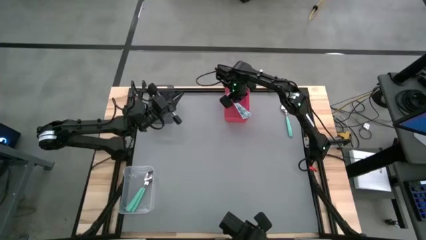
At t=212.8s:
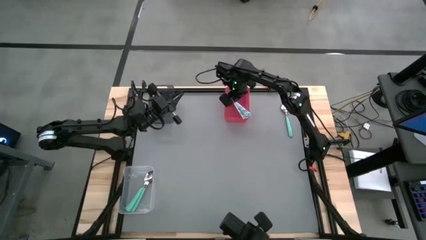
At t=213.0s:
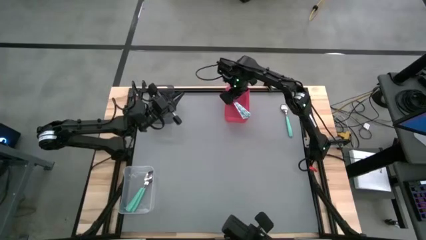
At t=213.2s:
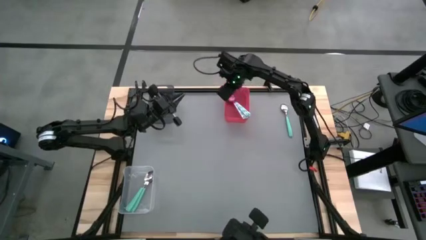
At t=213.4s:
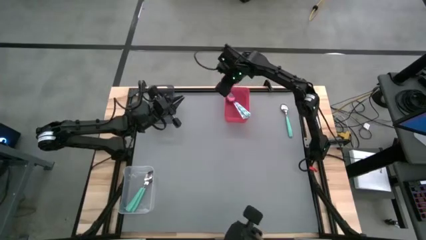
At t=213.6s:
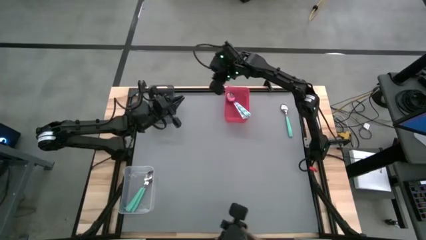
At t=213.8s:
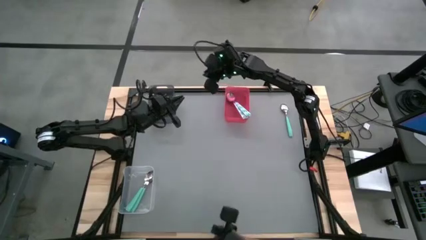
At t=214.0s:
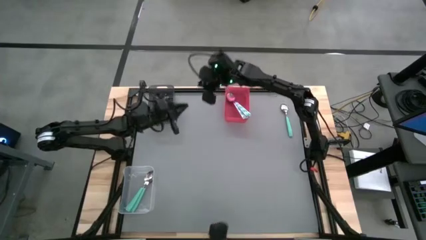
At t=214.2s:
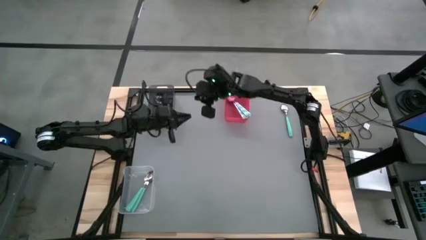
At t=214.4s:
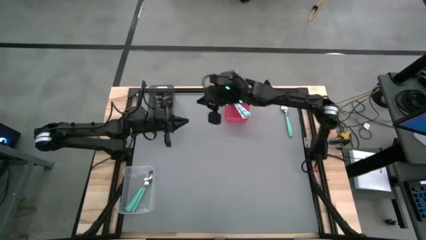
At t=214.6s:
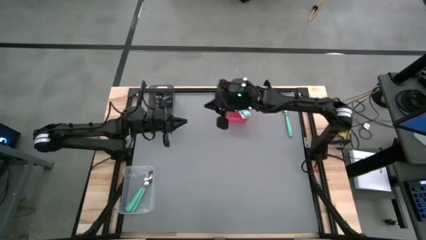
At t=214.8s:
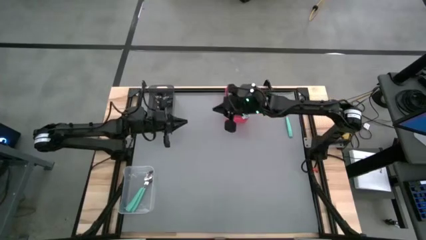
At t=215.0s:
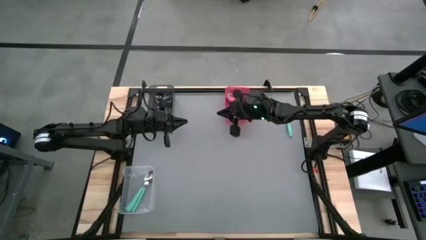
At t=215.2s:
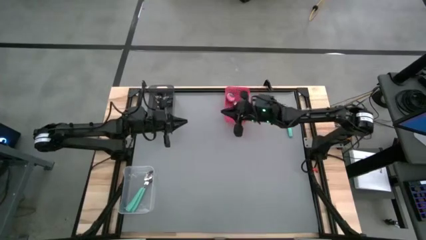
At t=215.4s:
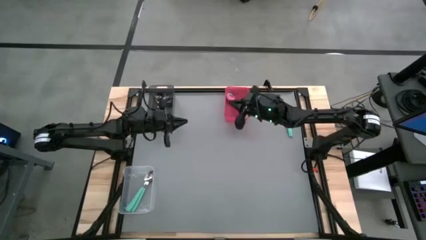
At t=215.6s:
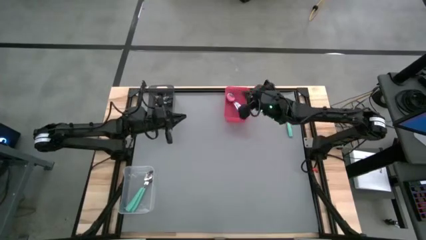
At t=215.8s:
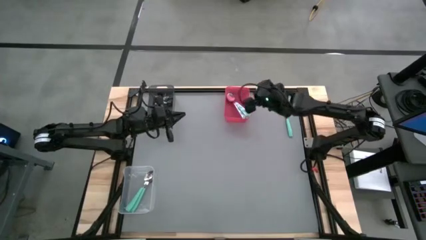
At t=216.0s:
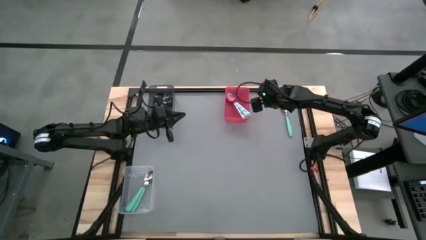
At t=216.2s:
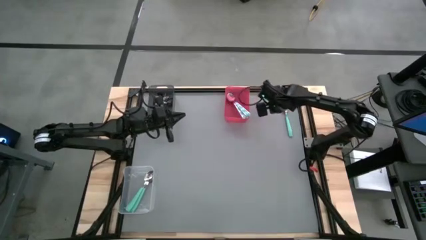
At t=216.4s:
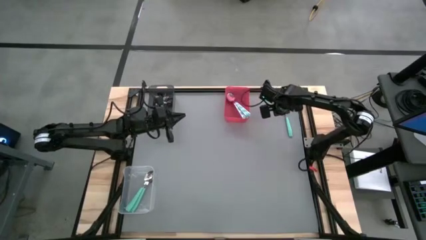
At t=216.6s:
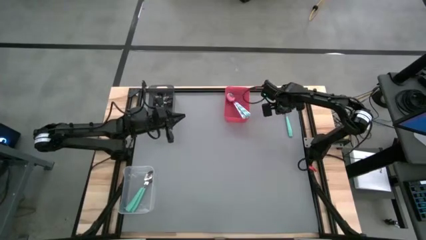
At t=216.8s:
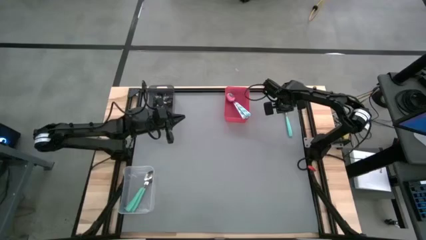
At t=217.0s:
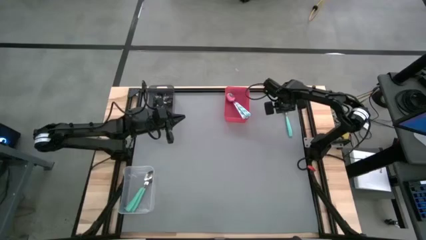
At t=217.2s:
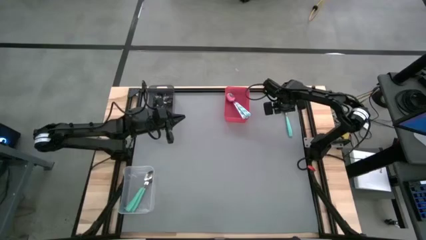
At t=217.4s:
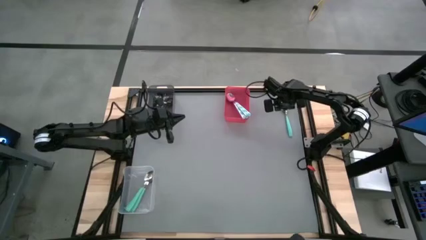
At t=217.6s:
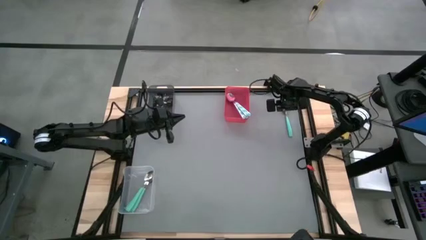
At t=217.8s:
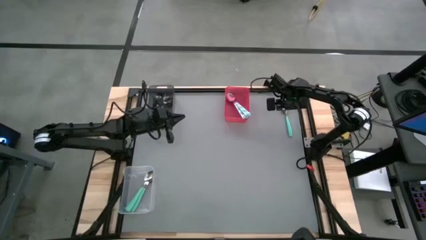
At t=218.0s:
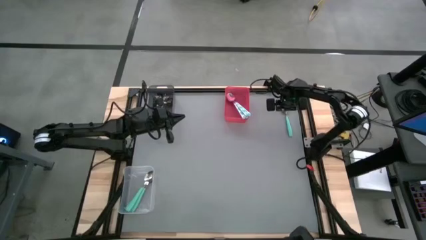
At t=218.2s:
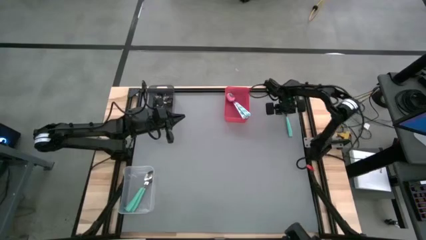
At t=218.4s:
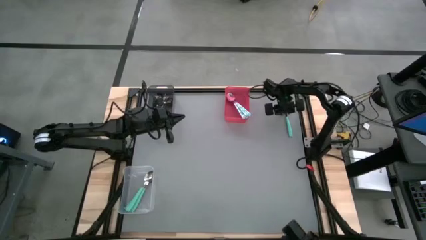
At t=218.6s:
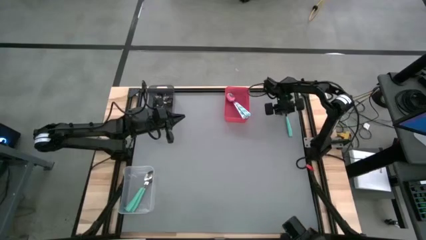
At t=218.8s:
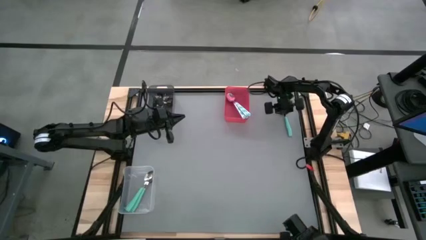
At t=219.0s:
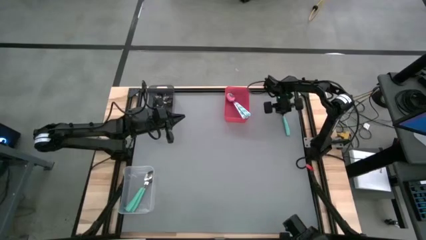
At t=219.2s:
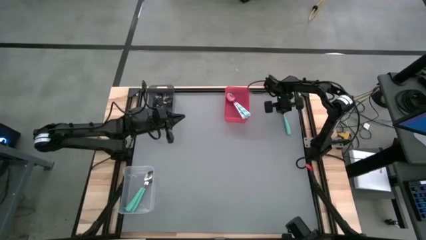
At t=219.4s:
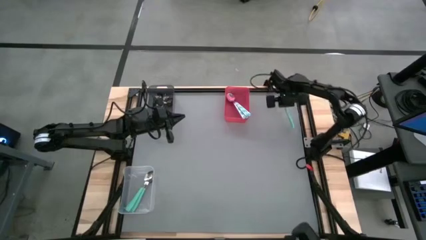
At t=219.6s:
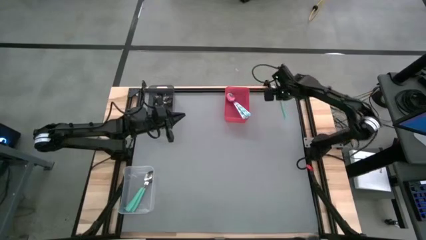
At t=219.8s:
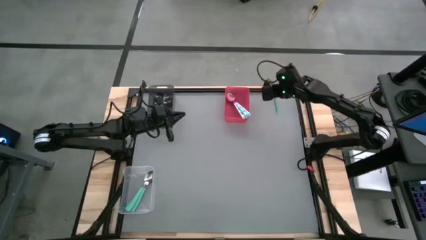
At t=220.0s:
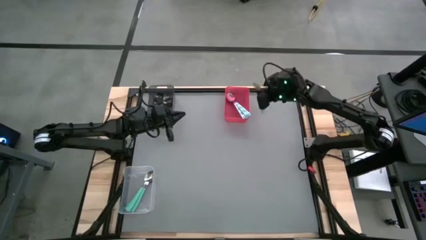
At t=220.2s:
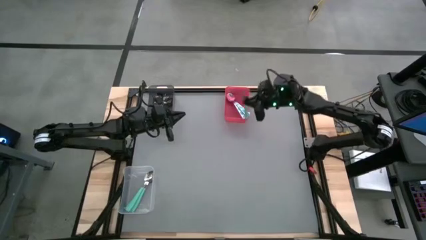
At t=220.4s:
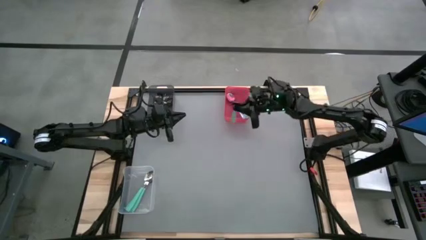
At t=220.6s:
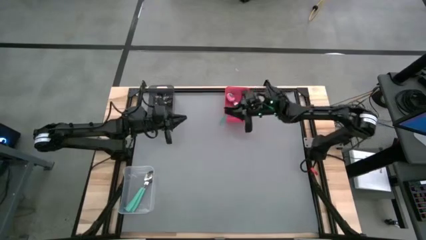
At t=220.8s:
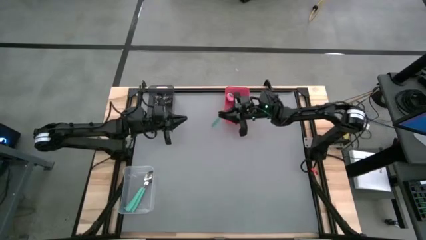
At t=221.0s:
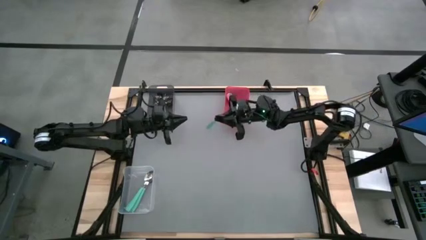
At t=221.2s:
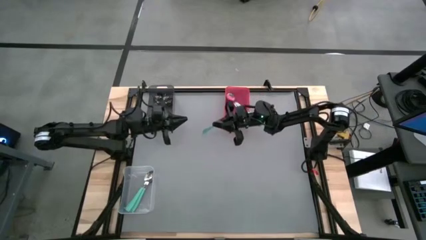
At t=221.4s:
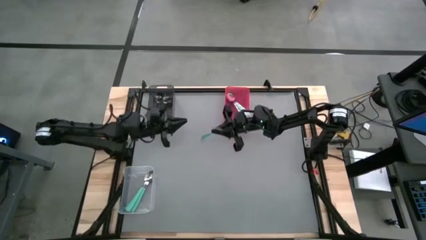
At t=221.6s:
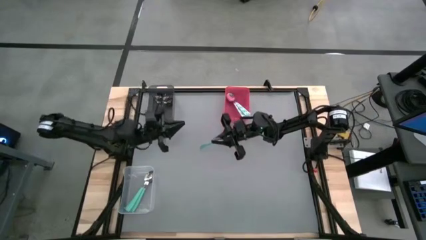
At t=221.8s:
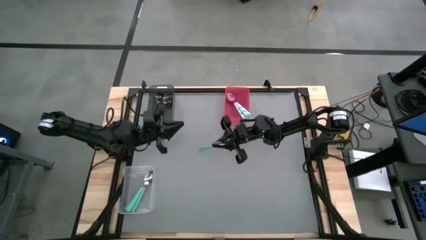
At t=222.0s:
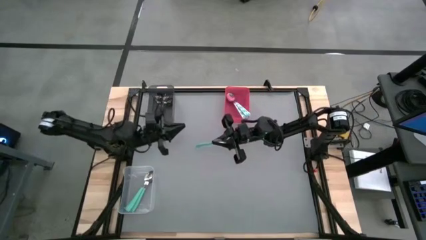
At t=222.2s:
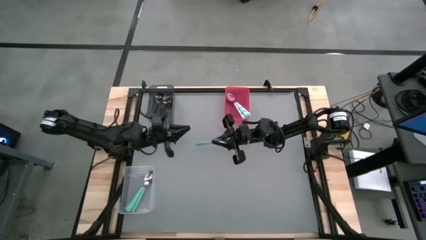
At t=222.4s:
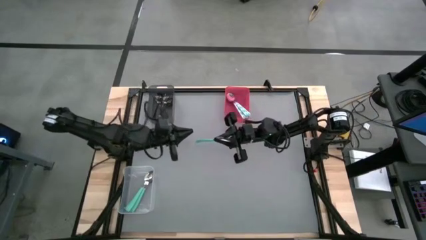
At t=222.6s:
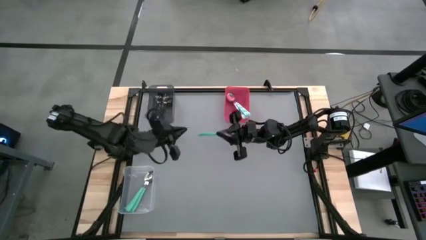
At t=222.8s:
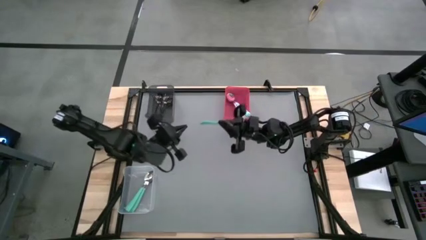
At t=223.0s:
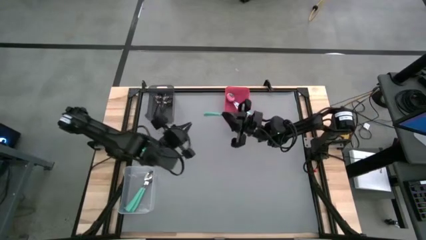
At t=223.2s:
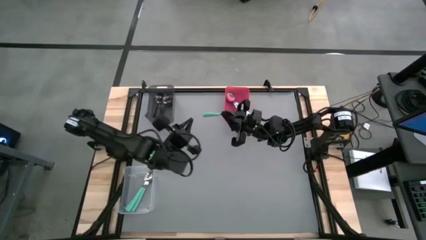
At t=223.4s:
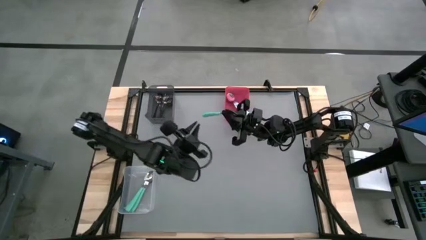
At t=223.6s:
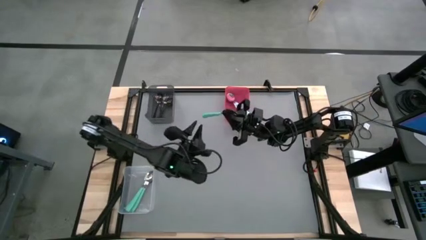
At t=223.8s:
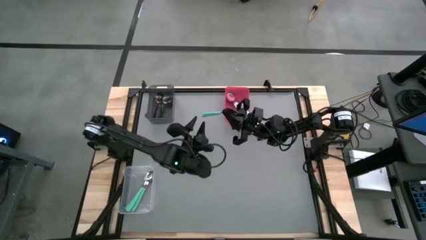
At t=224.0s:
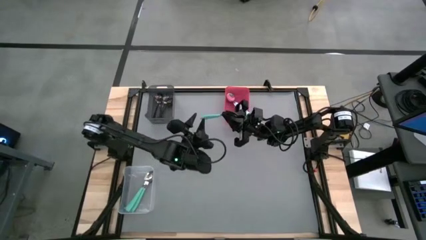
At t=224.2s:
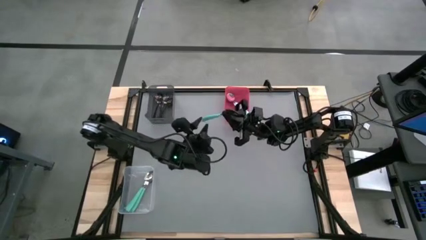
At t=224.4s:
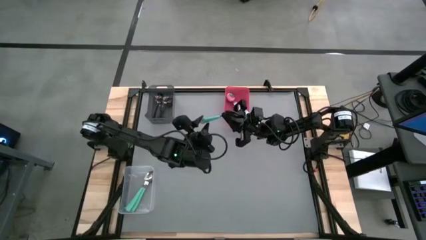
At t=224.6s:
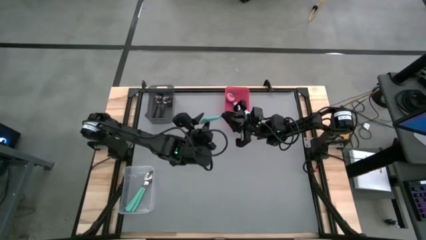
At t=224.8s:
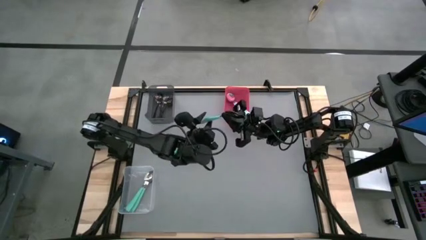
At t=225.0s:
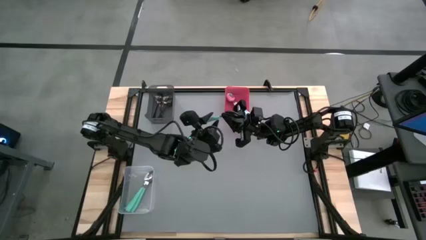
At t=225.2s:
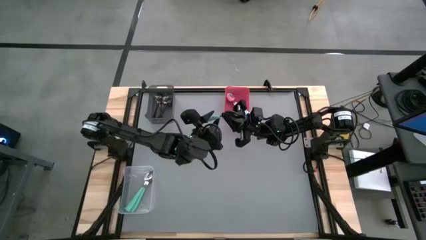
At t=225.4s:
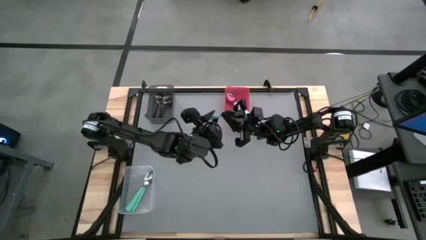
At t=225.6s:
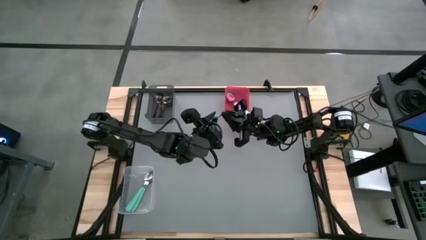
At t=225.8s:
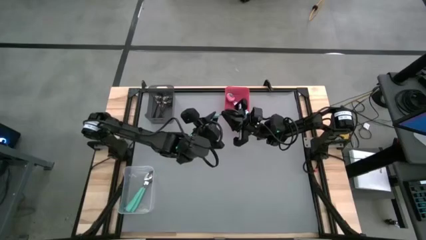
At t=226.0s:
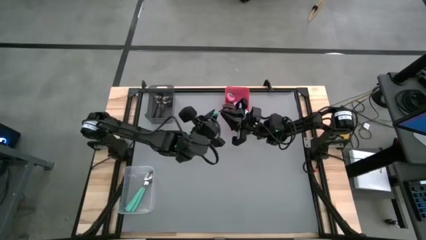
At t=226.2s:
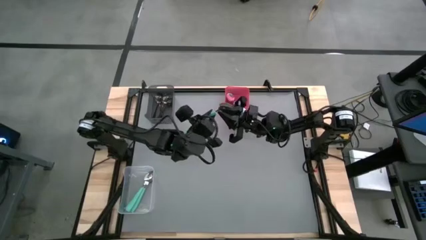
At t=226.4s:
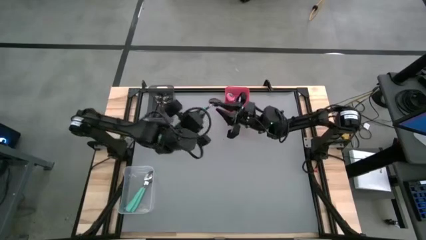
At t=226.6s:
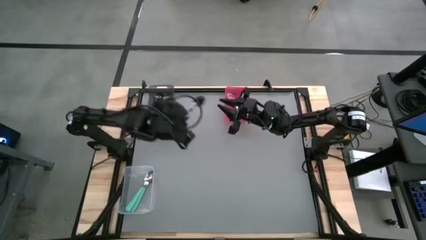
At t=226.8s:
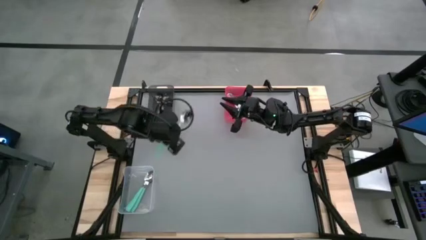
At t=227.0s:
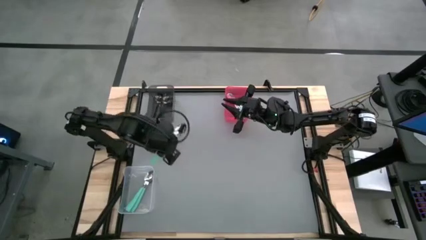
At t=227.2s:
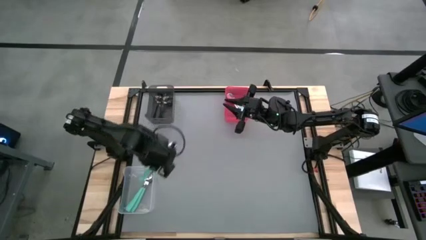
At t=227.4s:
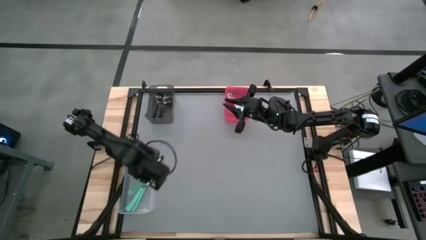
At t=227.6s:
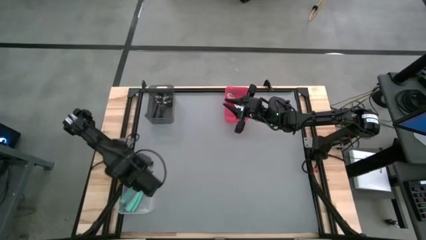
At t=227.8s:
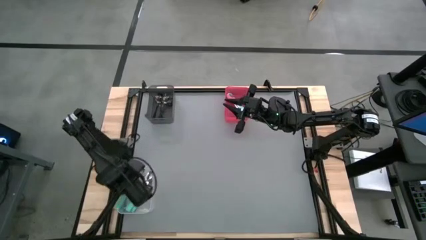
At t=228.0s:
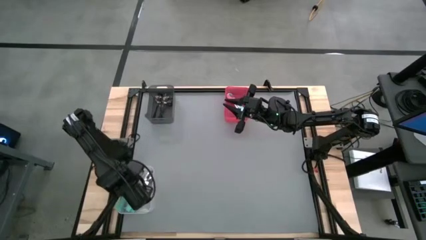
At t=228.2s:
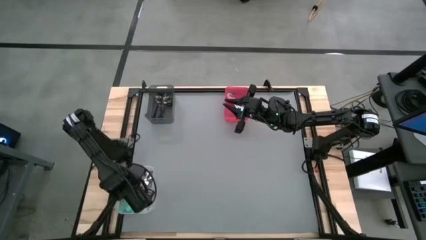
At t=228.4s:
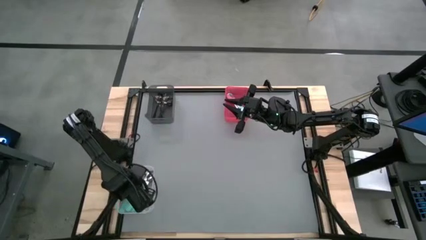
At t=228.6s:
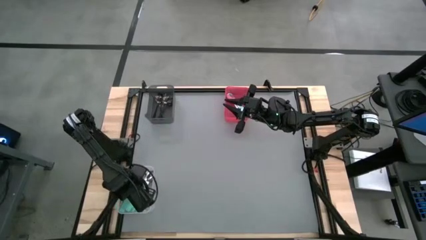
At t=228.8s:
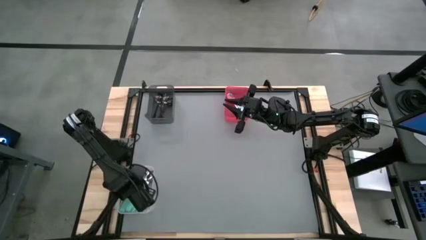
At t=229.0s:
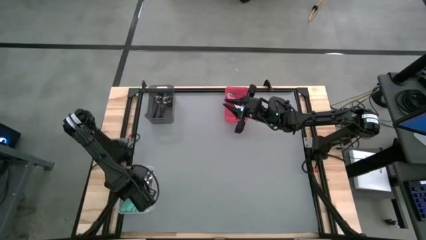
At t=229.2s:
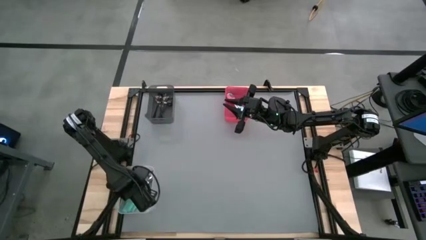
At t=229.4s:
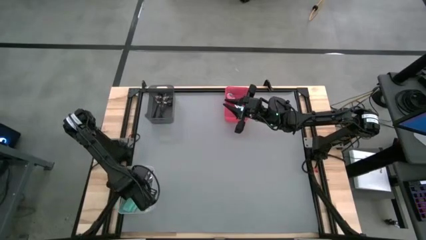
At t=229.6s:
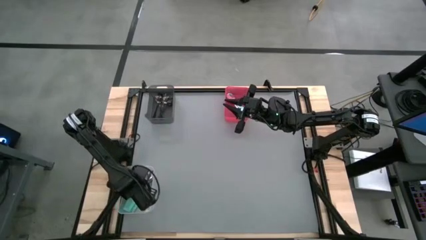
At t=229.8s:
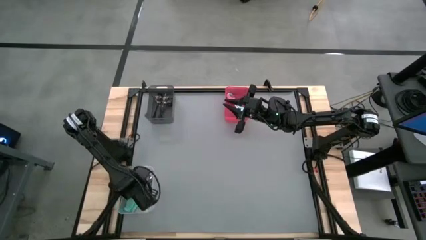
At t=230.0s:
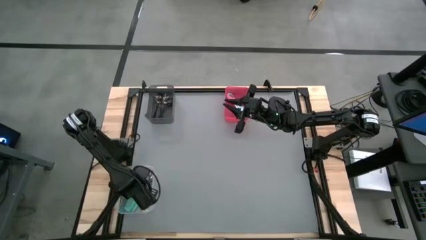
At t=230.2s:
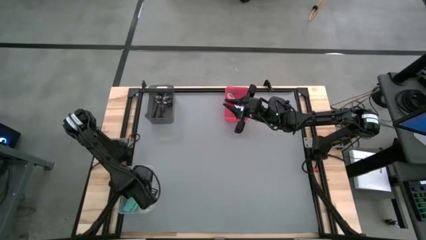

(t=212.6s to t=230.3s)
Task: Sort silverware by color (type)
Put the green spoon into the transparent bin
